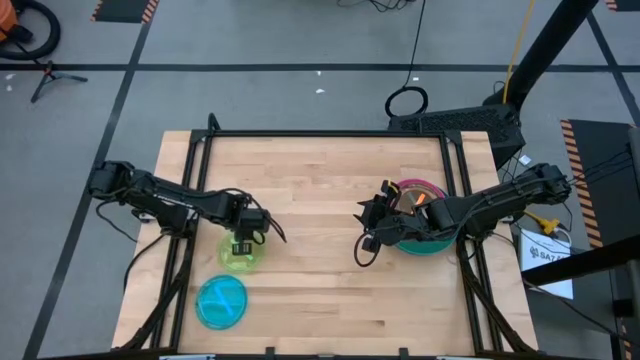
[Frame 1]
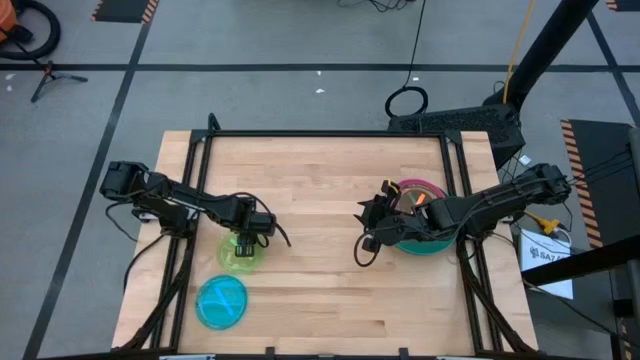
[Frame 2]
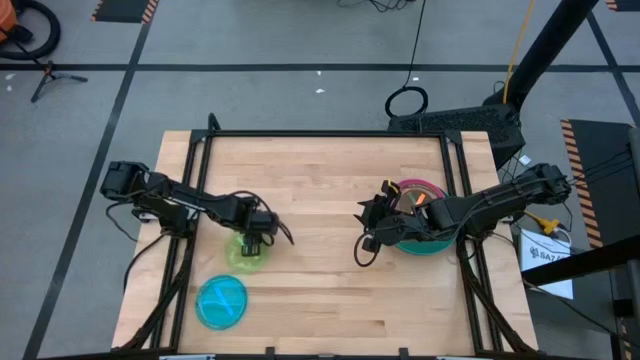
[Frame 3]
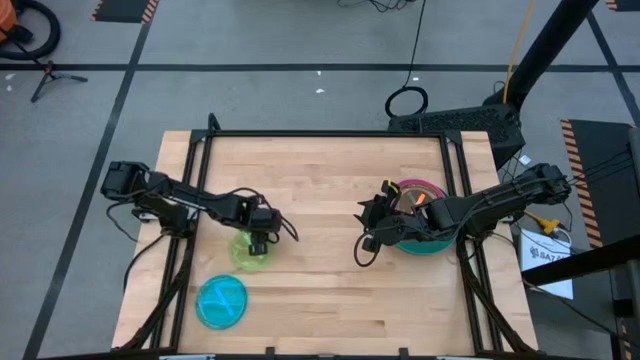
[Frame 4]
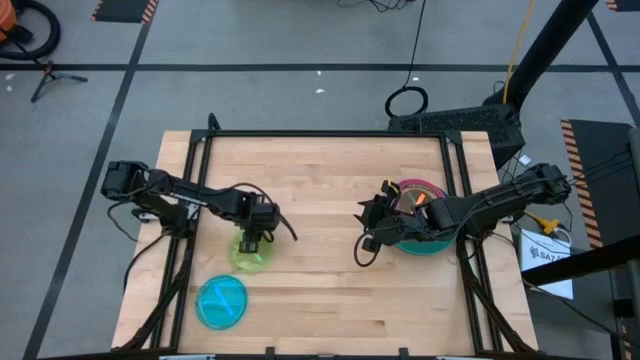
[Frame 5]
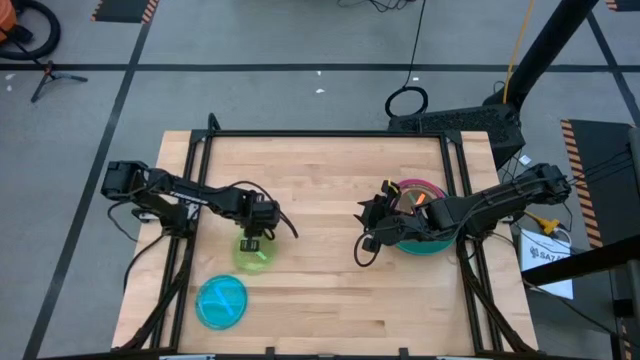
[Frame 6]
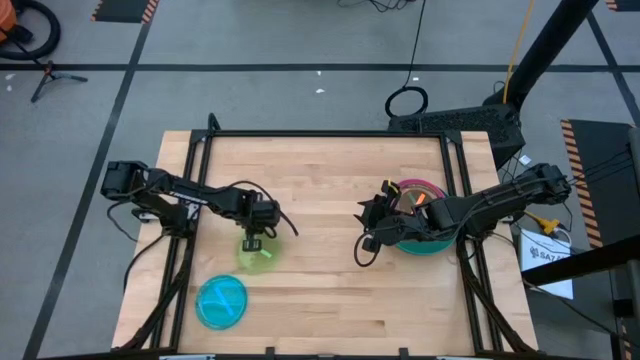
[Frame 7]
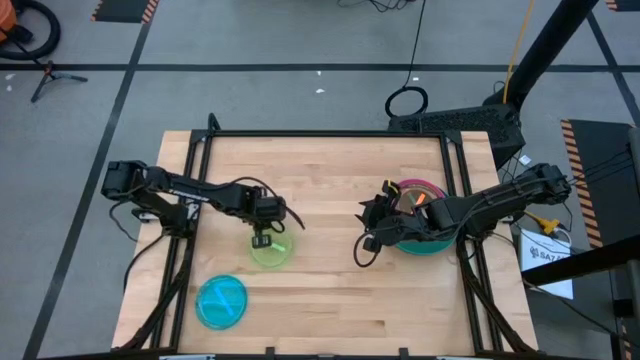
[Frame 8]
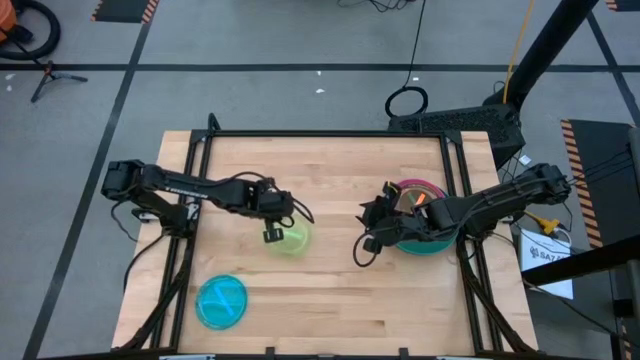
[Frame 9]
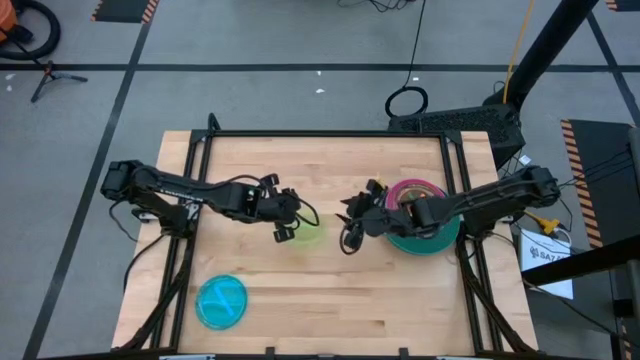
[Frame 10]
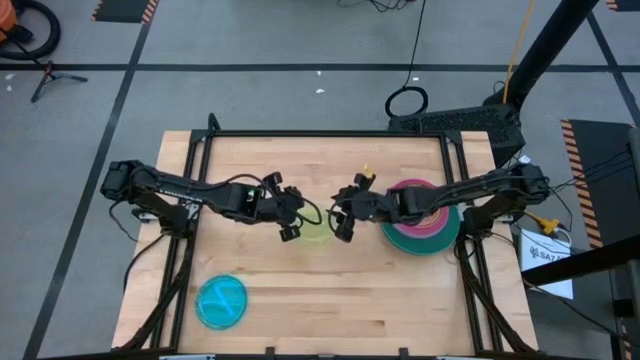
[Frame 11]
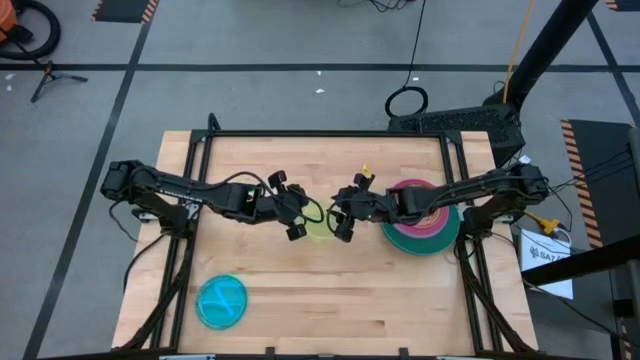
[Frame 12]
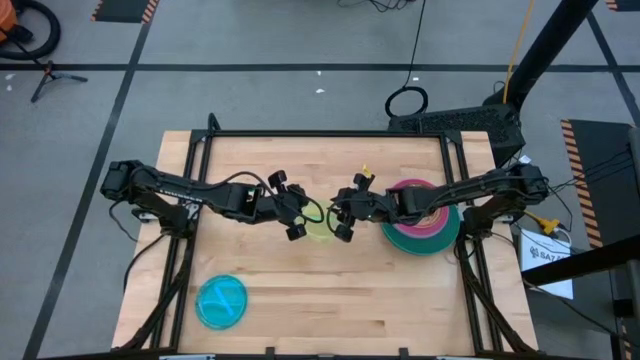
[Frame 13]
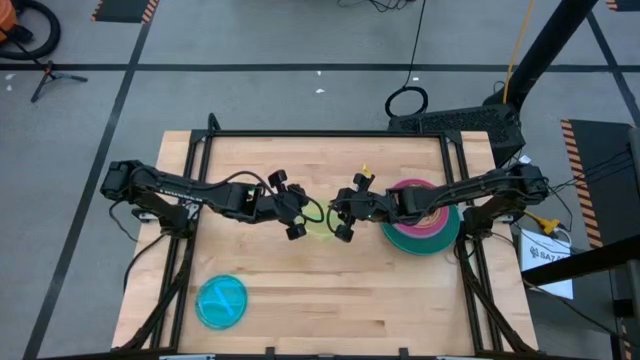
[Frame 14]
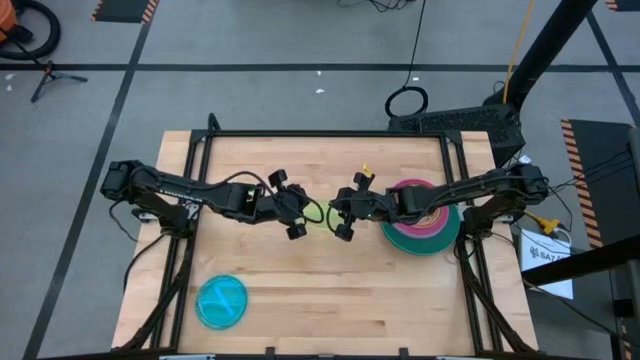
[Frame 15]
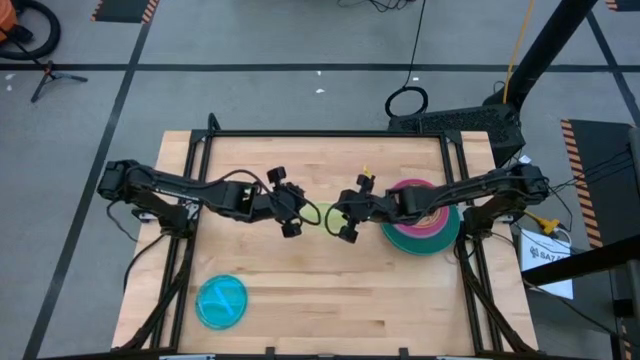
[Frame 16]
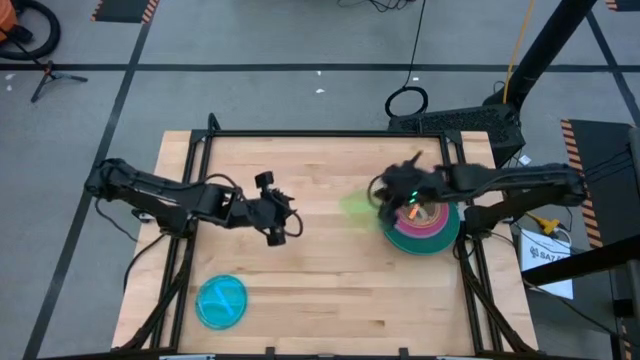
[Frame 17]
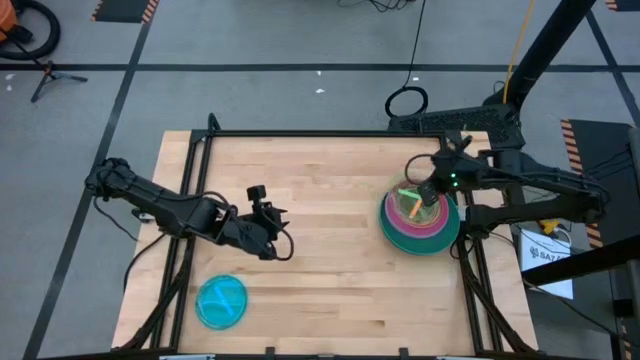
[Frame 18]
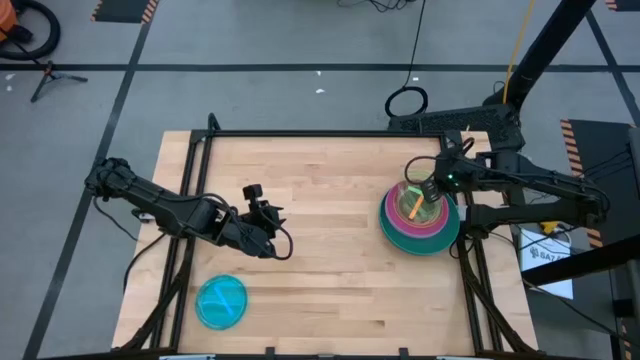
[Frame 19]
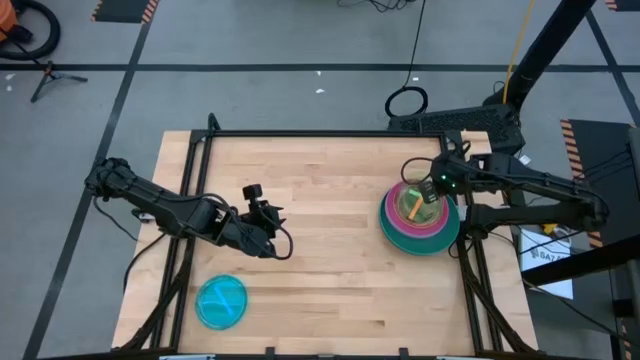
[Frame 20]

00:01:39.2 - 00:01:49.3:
Task: Stack plastic plates
Stack the light green plate on top of the orange plate

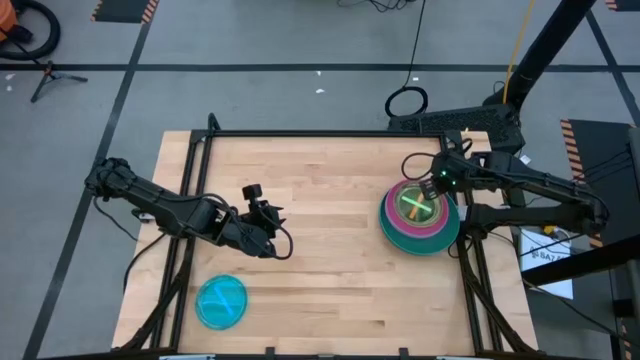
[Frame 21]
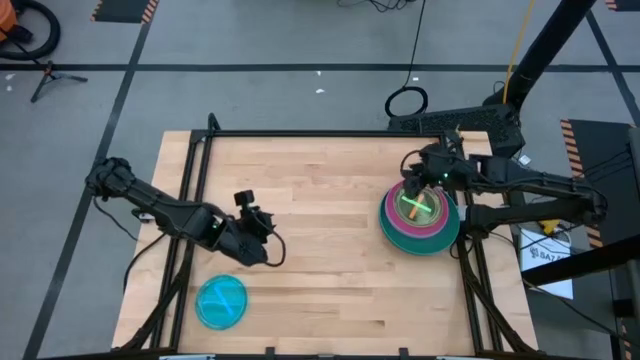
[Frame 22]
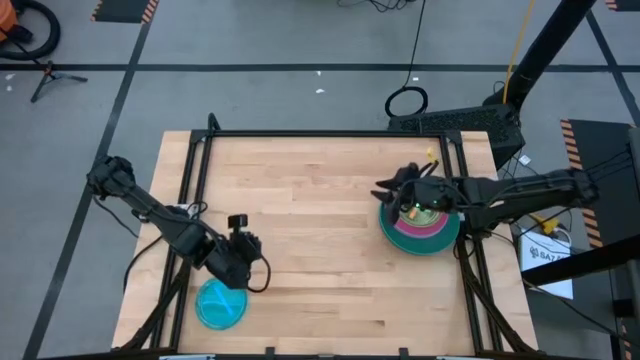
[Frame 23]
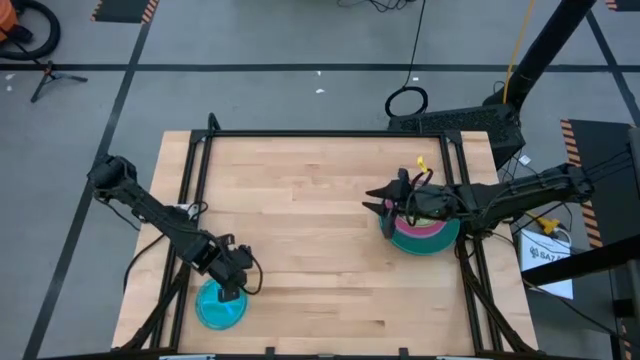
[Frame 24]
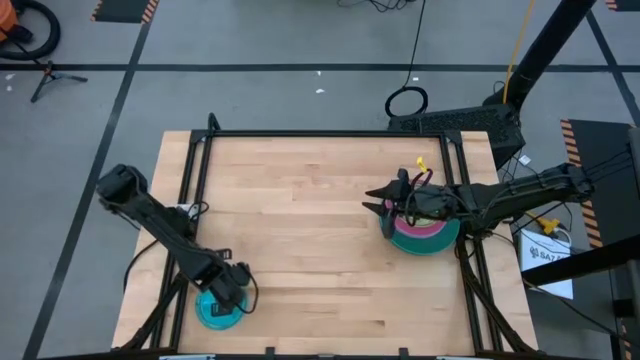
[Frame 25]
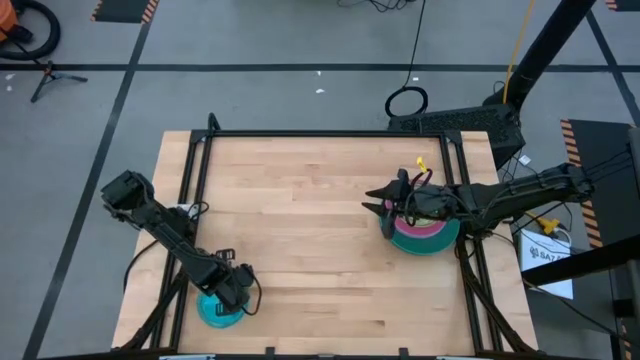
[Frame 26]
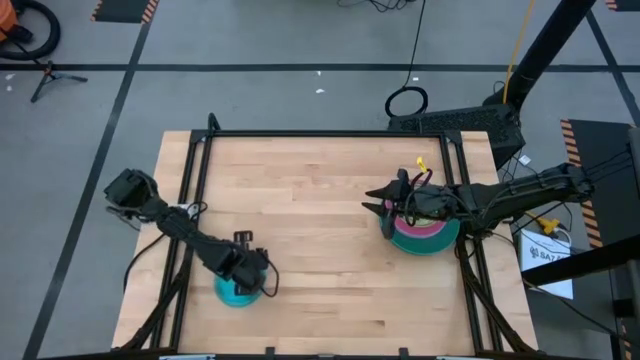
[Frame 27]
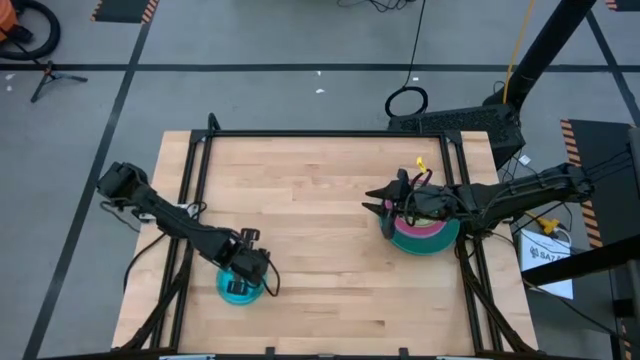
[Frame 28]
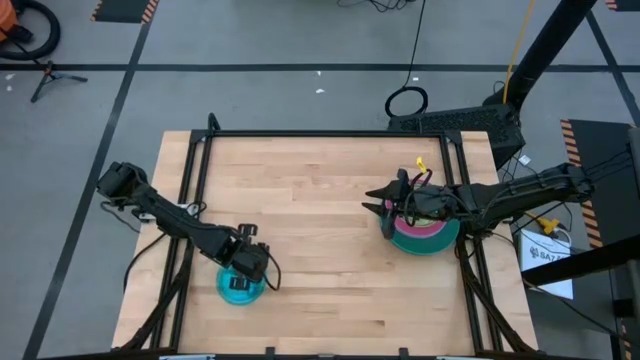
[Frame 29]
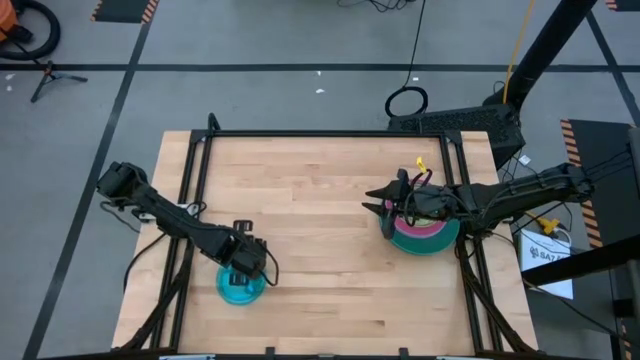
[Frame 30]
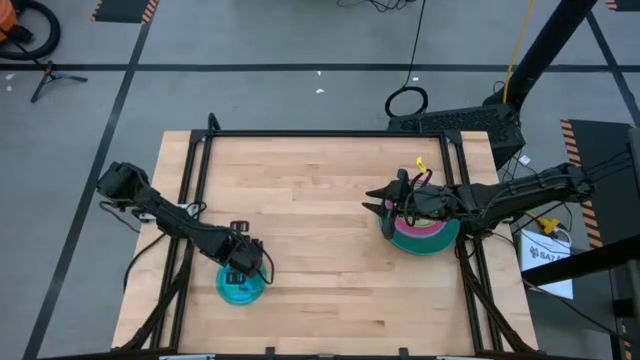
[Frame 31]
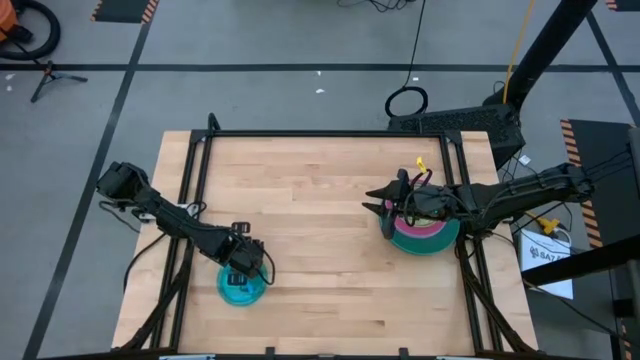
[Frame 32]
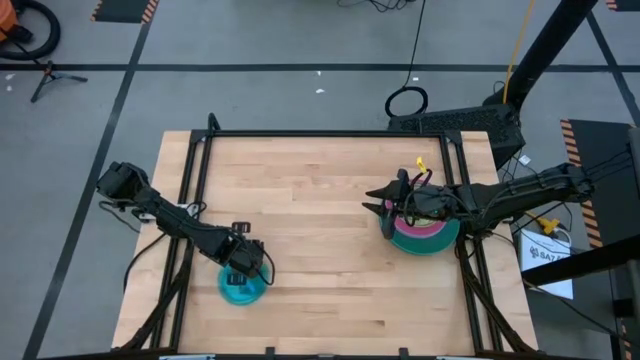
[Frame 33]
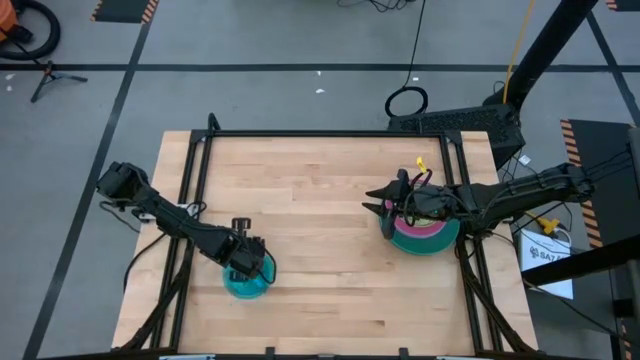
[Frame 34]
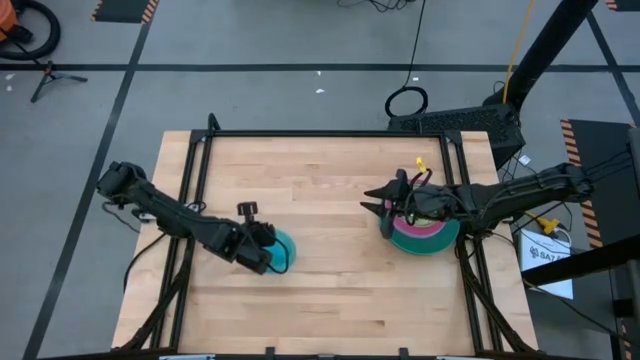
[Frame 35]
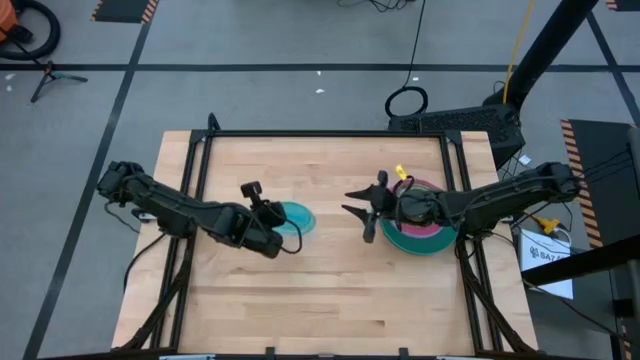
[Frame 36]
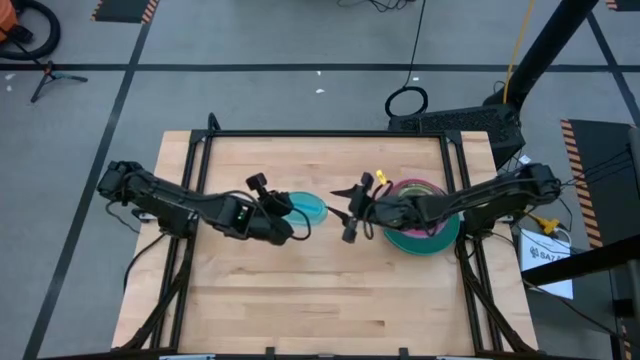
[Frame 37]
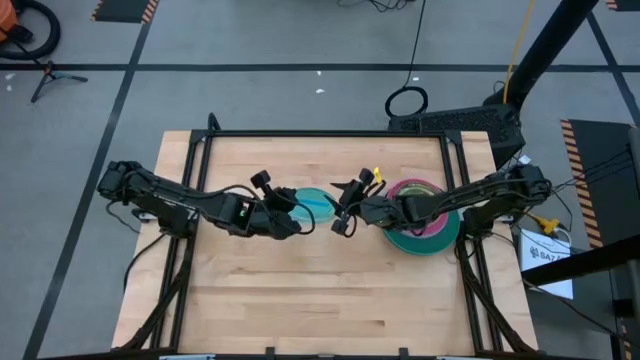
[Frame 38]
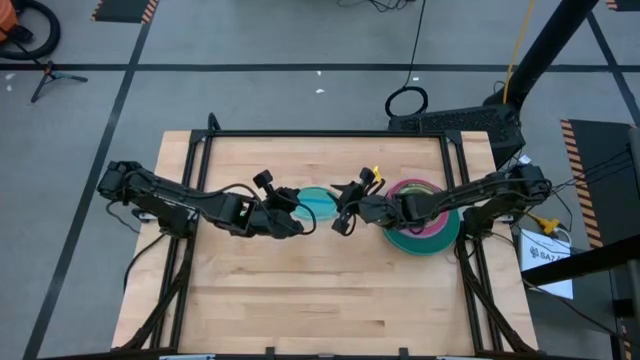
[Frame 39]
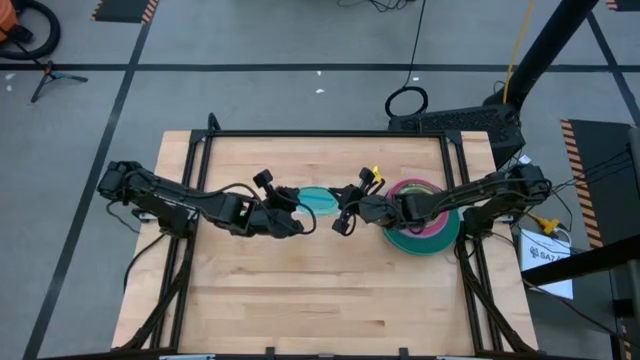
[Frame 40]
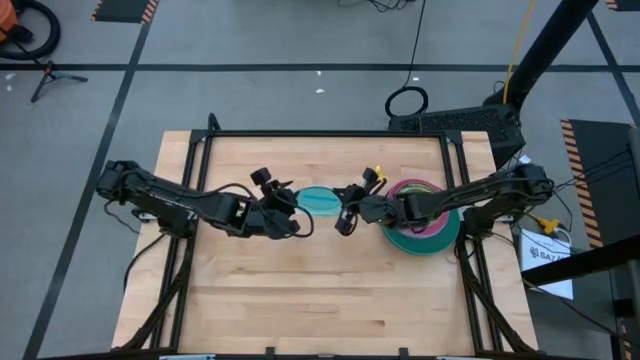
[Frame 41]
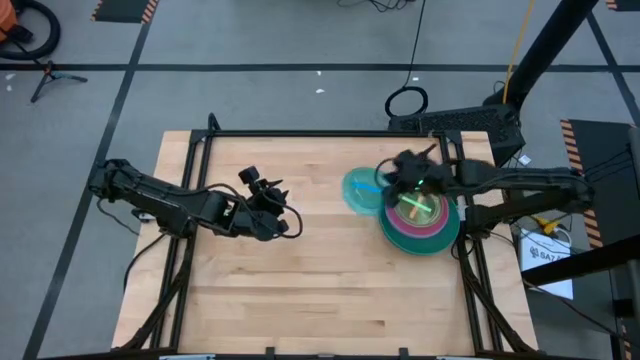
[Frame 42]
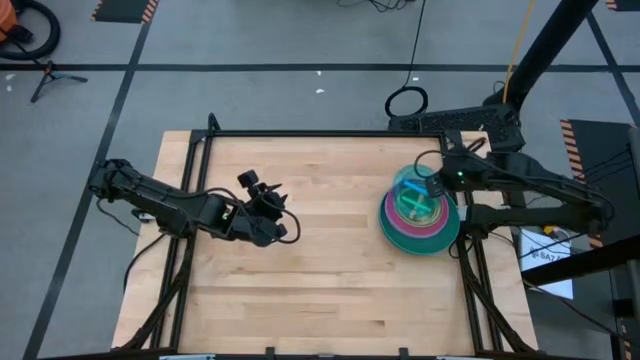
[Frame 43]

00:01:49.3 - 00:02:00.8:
Stack the light blue plate on top of the light green plate
